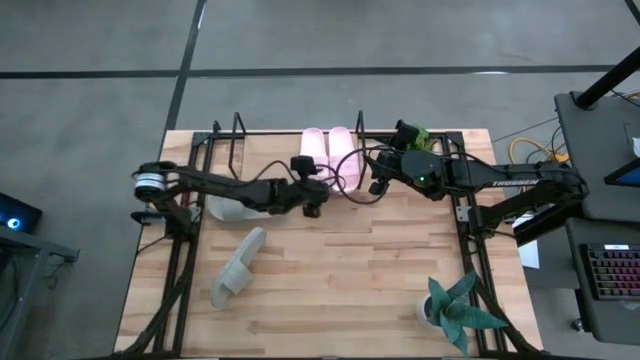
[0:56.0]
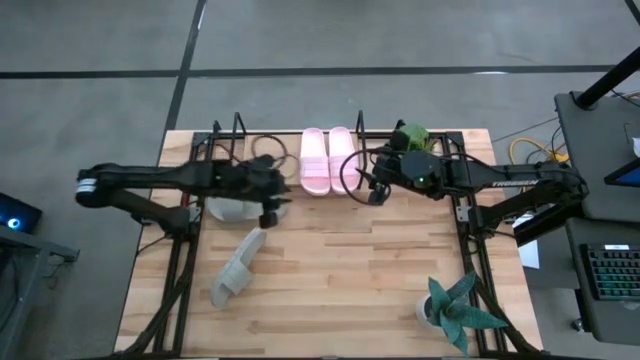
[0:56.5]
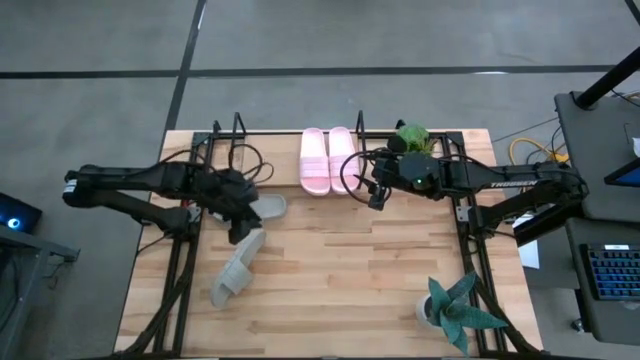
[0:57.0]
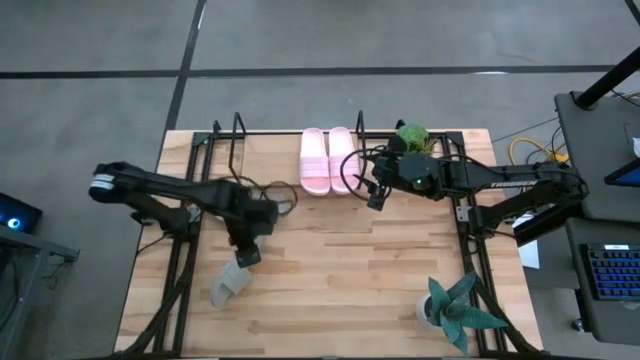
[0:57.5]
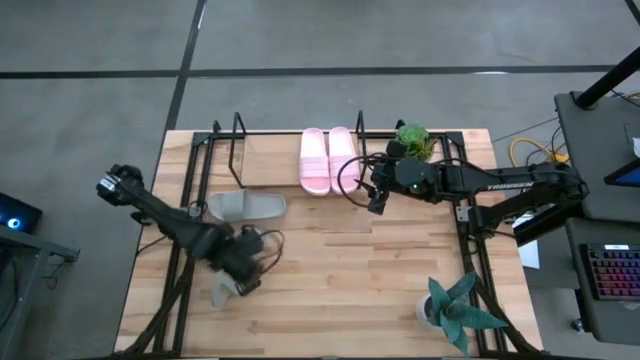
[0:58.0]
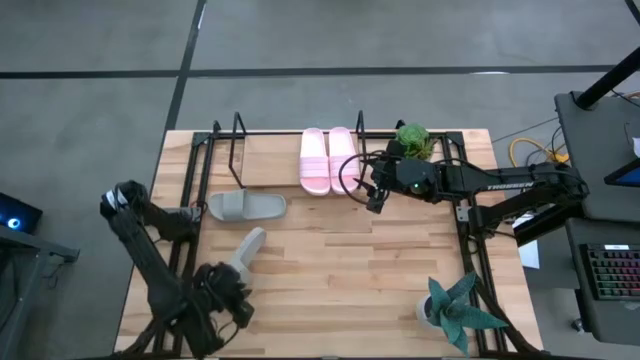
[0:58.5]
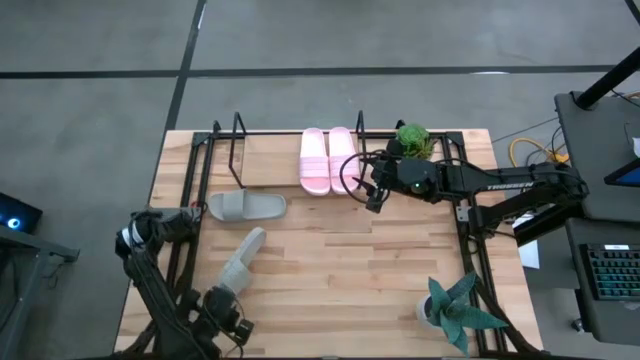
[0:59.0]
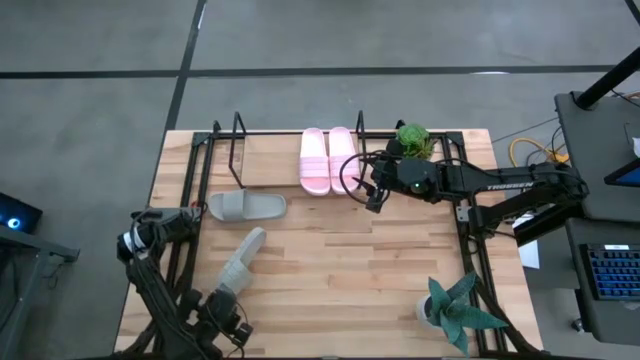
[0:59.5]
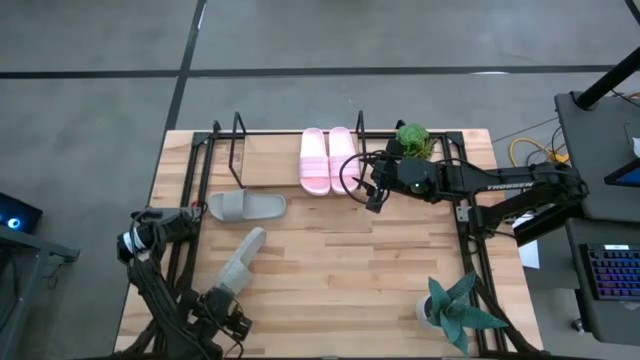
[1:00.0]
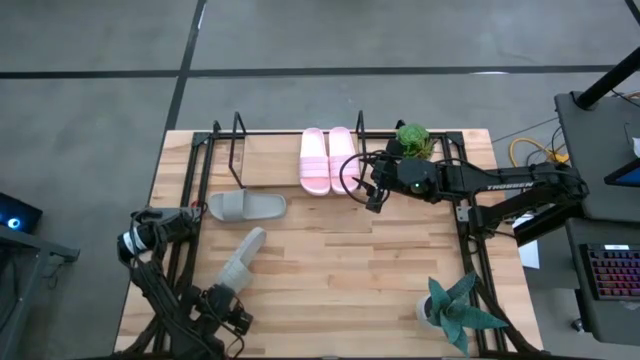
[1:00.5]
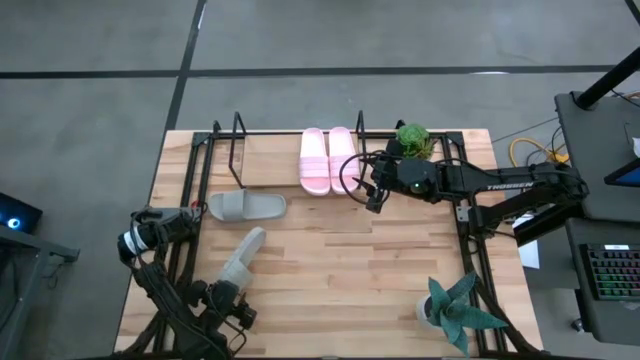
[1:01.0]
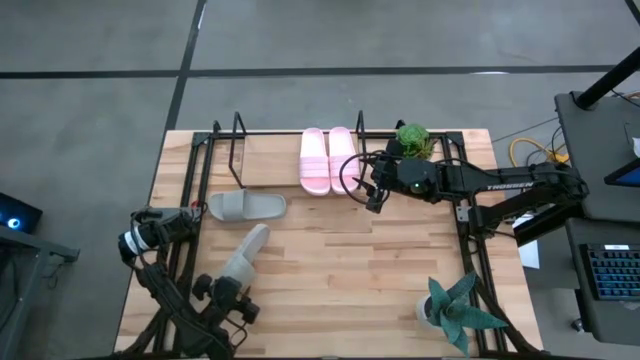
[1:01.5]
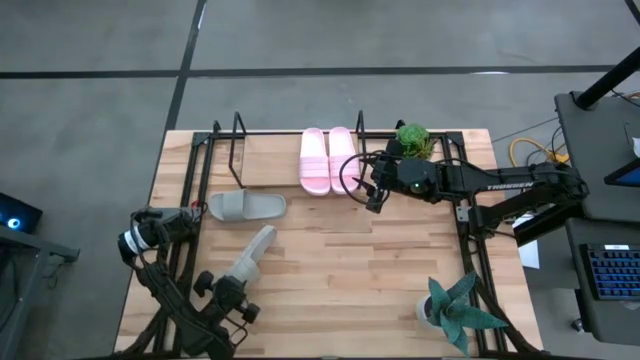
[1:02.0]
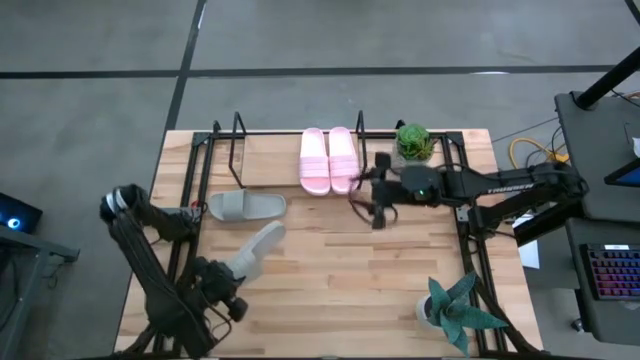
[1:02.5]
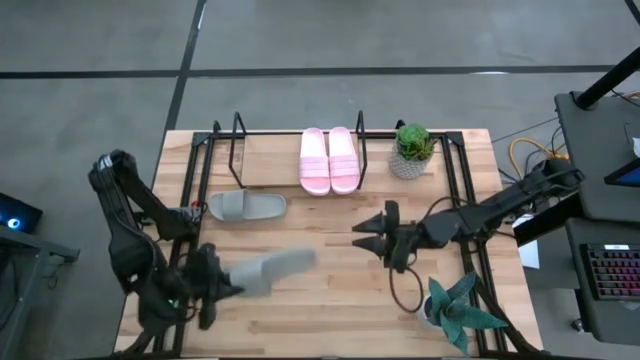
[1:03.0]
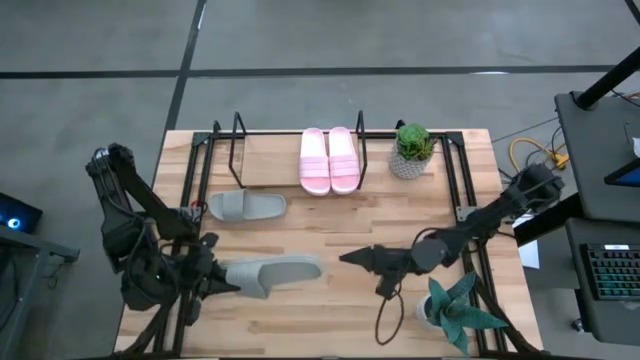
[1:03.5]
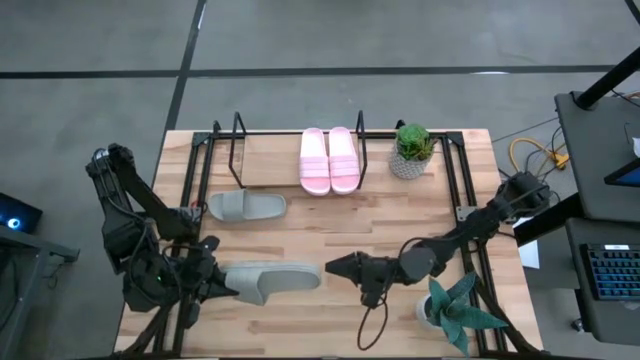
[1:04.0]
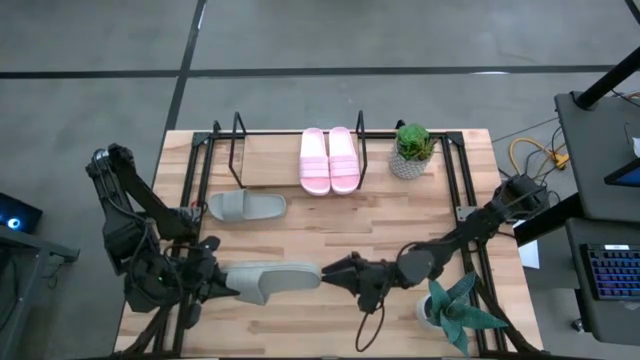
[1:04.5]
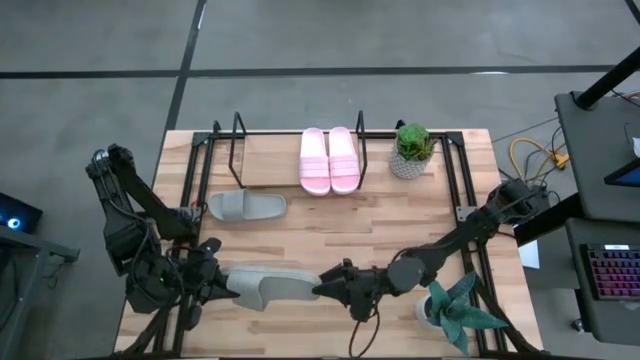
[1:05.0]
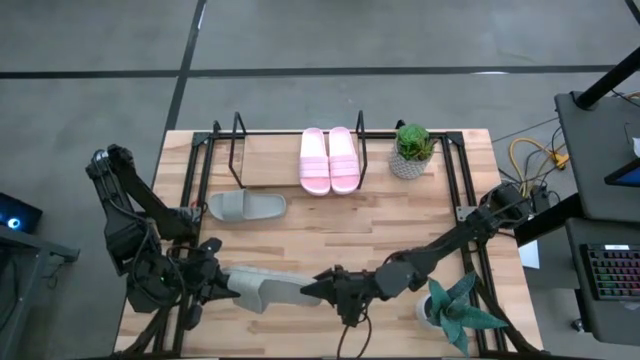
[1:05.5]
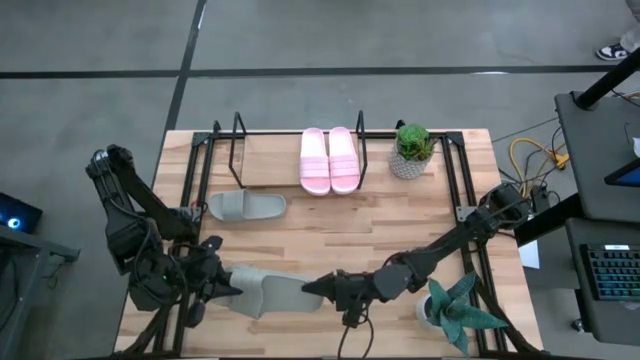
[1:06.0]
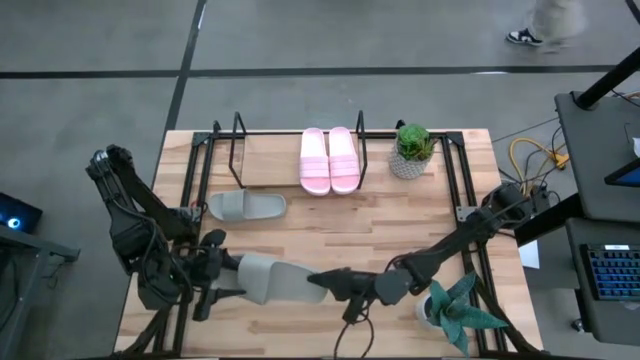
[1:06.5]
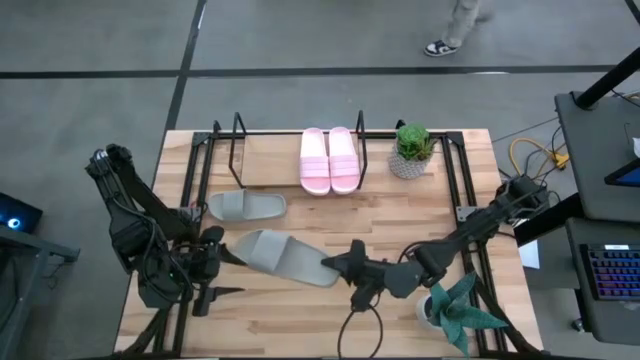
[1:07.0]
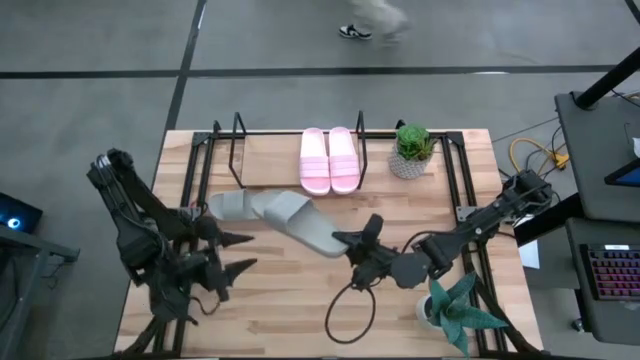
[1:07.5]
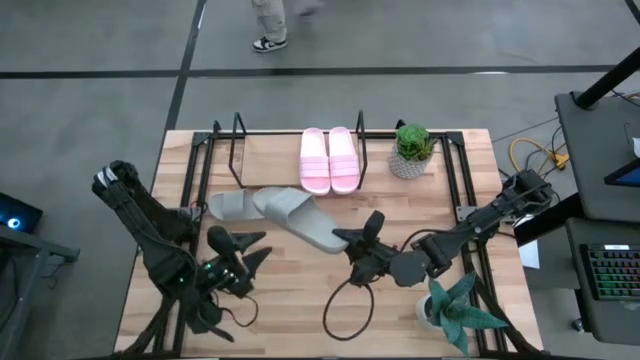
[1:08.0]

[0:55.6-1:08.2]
Task: Pick and place slides into the shelf
Put the bottom gray slide on the shelf

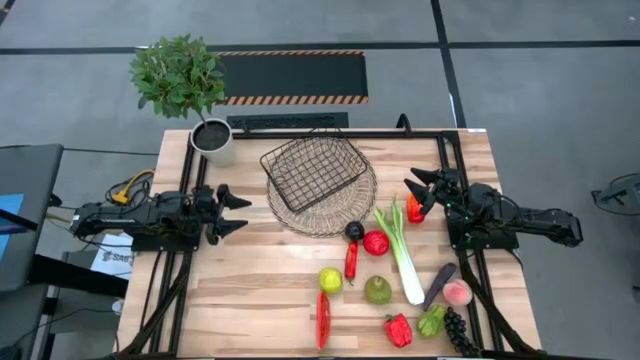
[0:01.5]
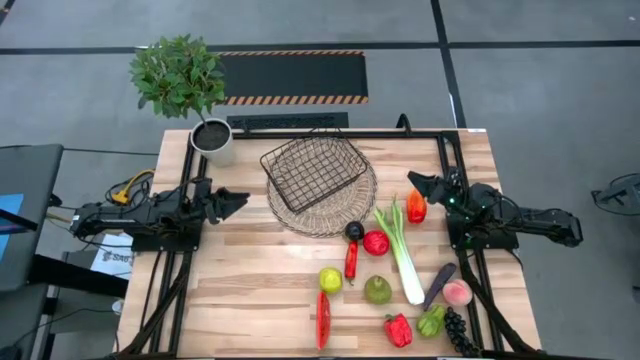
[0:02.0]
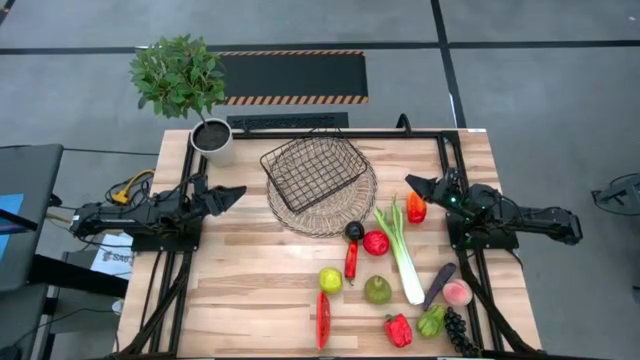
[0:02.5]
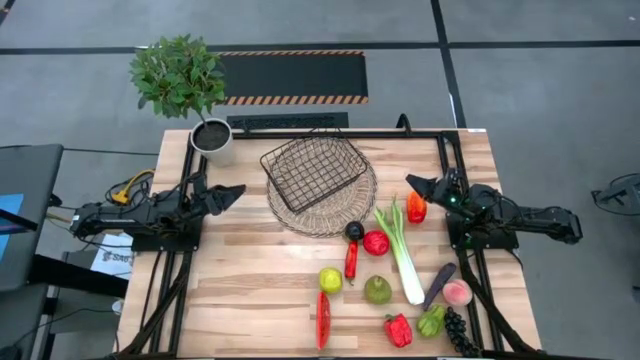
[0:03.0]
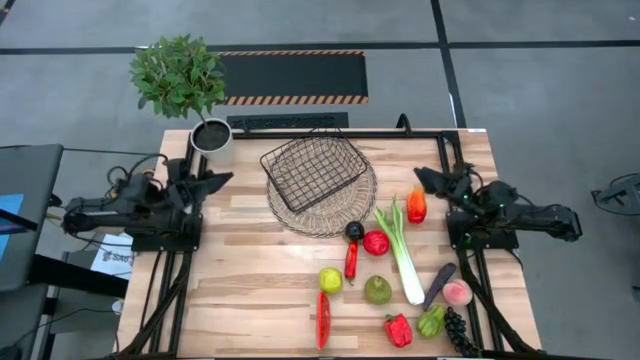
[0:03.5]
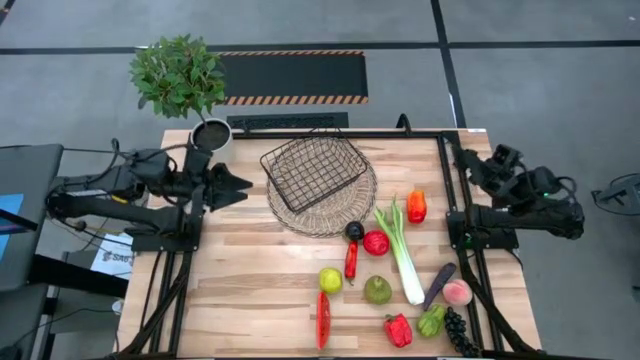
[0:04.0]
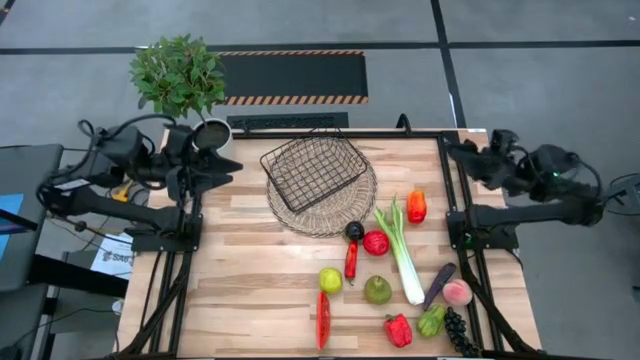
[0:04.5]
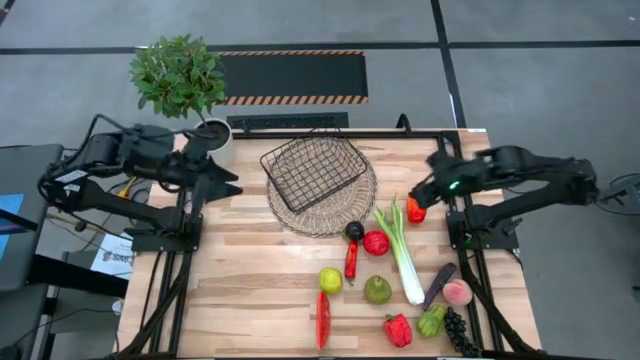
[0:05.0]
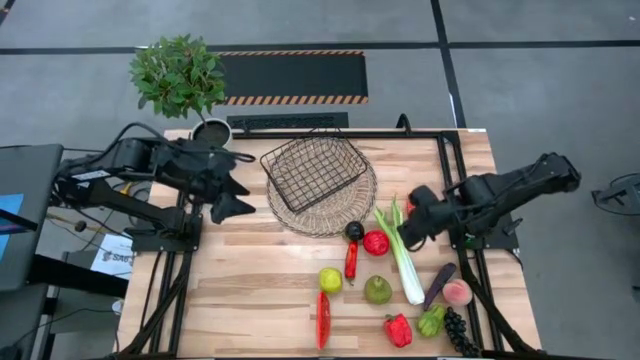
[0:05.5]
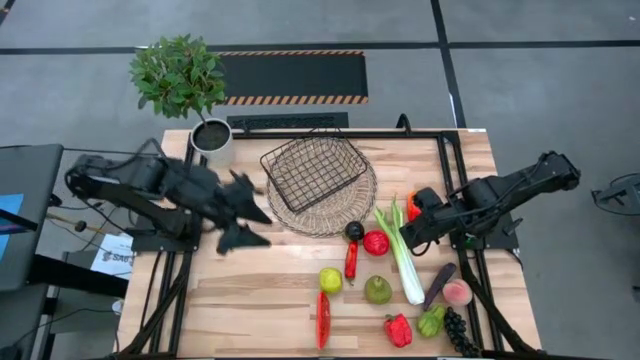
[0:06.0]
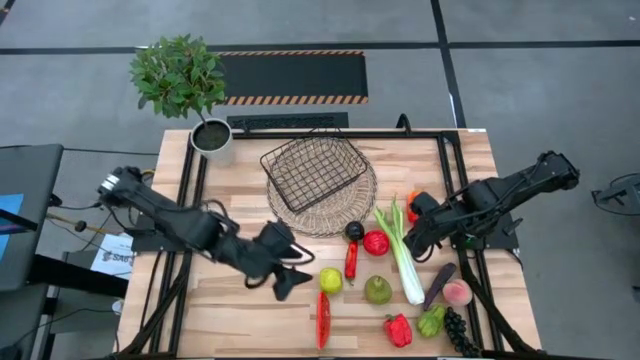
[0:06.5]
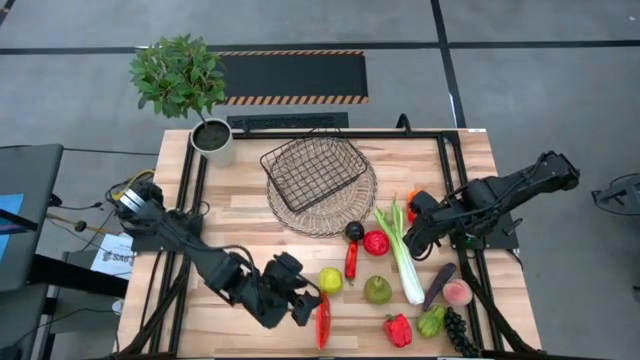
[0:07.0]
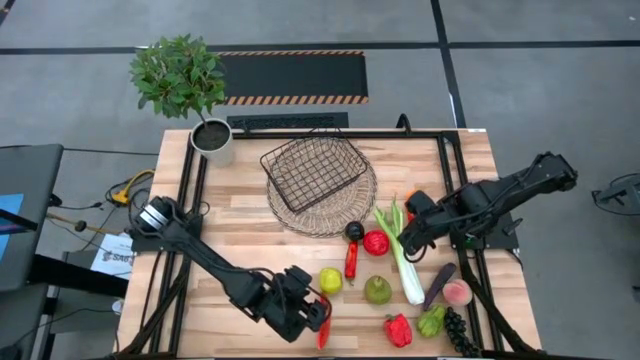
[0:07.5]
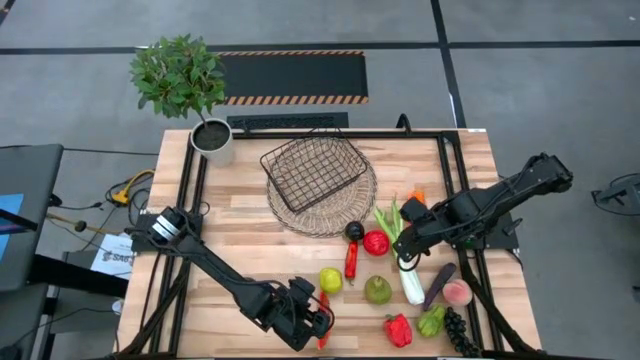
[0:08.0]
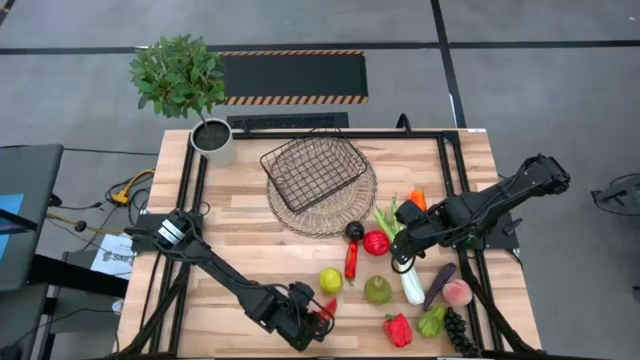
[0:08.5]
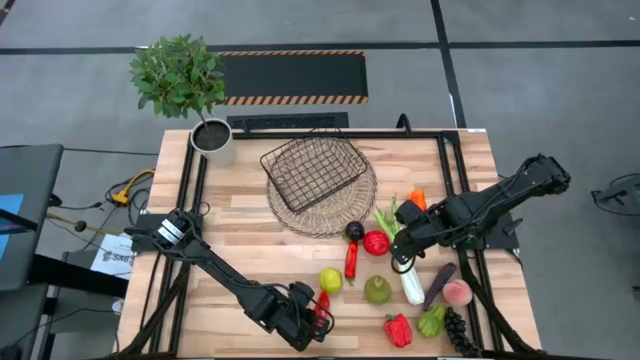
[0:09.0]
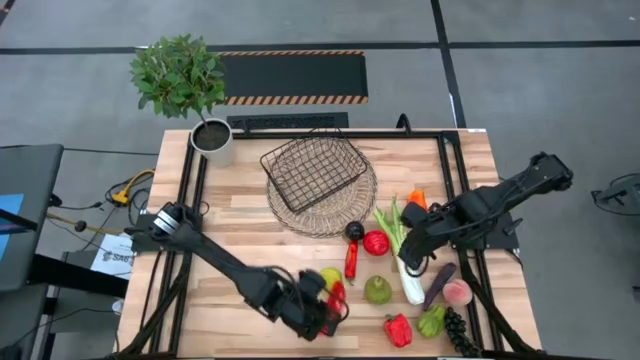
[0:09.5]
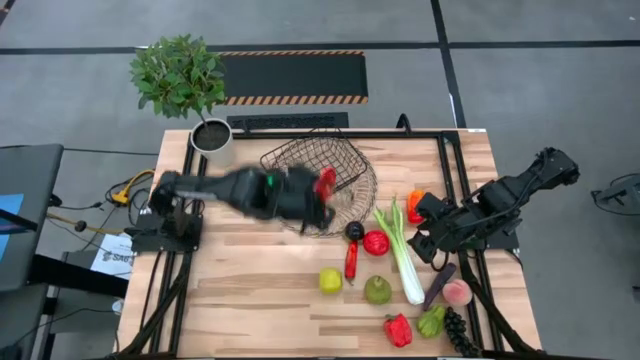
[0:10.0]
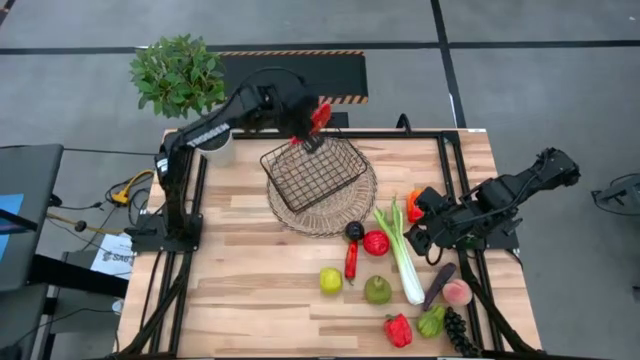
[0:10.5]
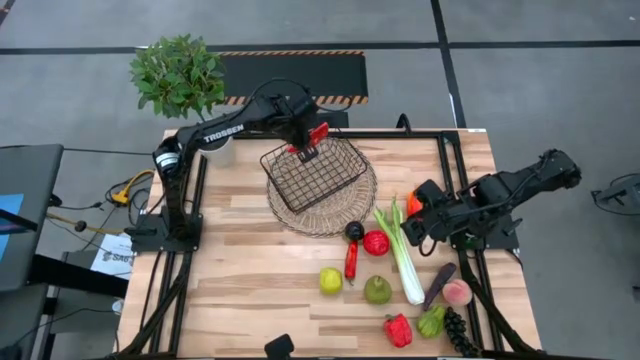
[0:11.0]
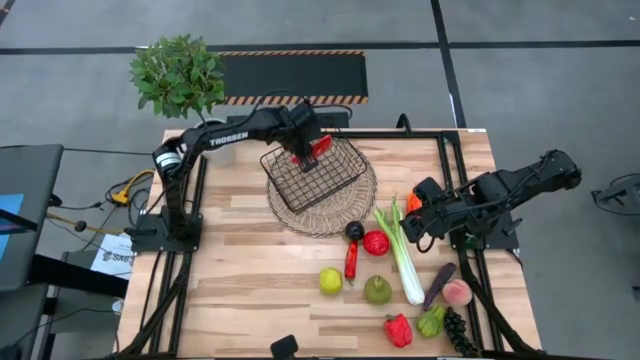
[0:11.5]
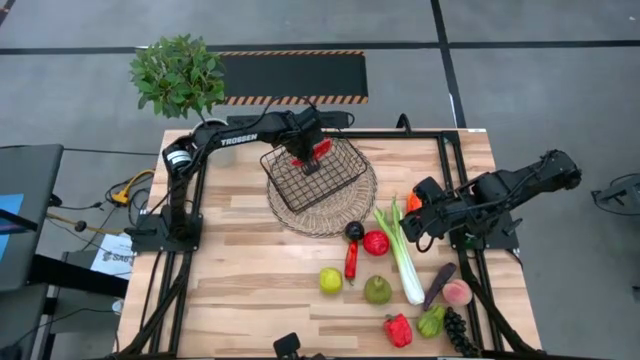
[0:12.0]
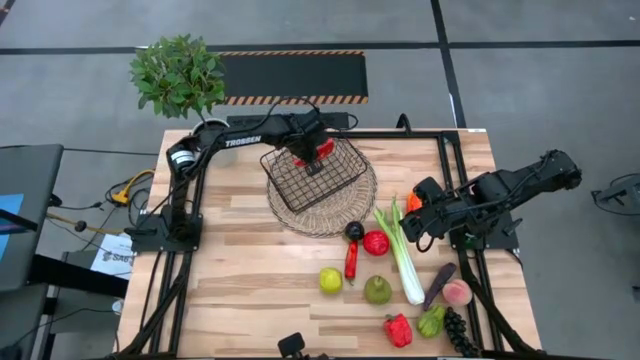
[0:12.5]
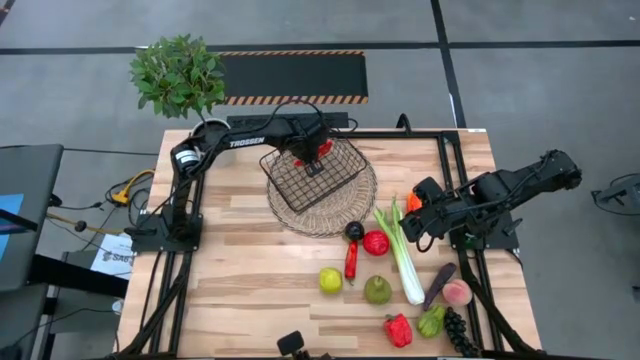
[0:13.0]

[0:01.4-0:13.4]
Task: Build produce basket
Put the red watermelon into the wire basket
